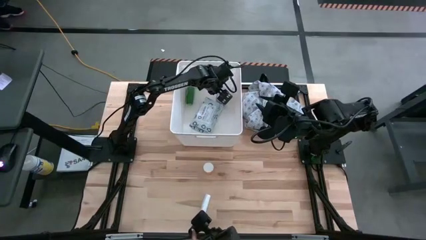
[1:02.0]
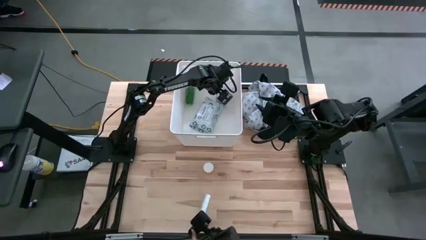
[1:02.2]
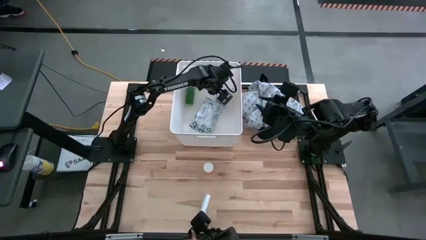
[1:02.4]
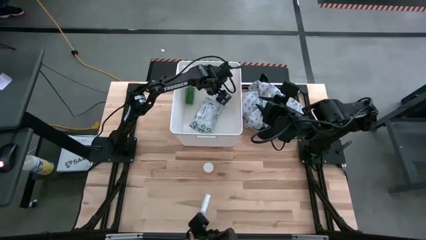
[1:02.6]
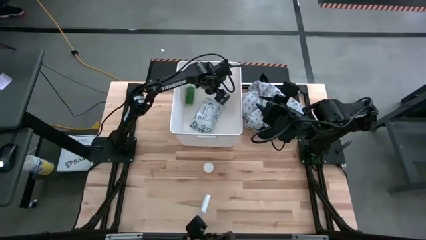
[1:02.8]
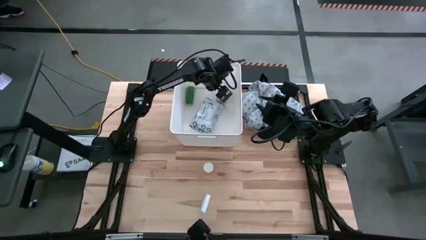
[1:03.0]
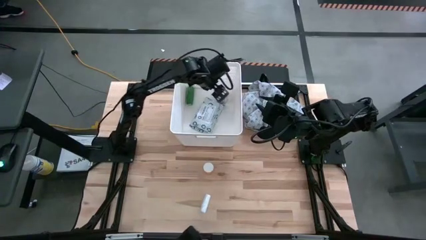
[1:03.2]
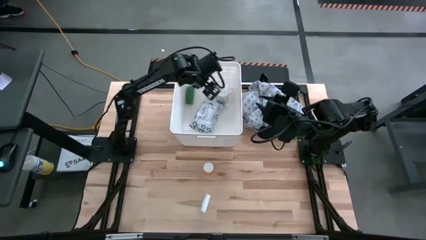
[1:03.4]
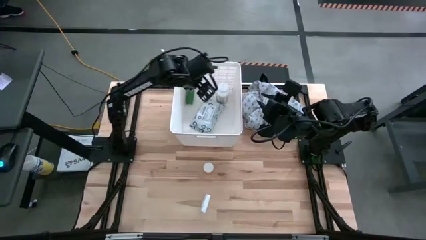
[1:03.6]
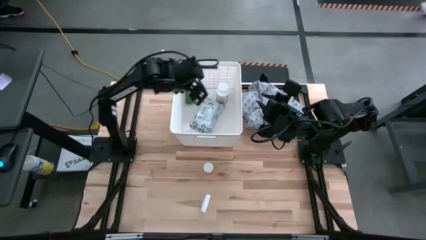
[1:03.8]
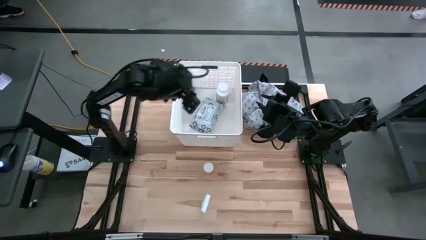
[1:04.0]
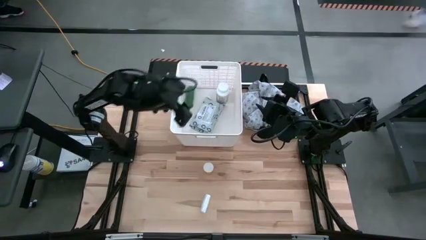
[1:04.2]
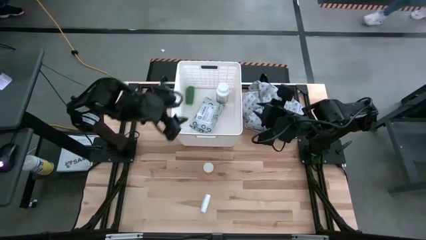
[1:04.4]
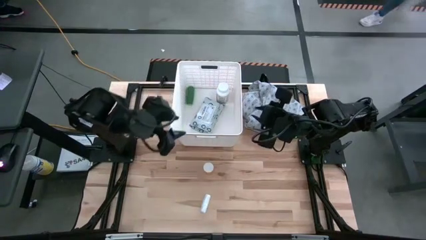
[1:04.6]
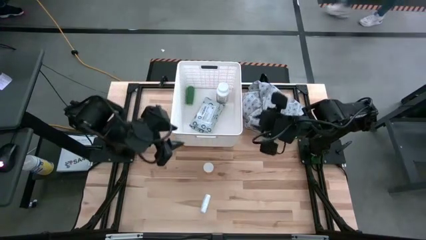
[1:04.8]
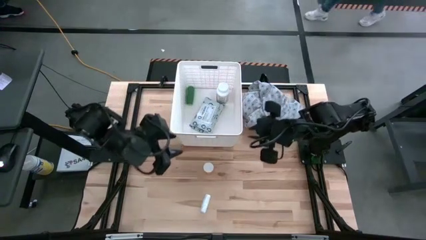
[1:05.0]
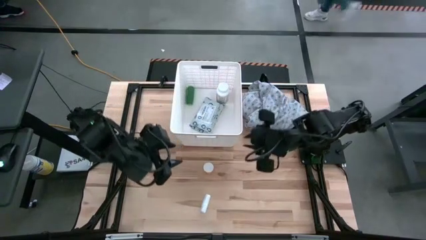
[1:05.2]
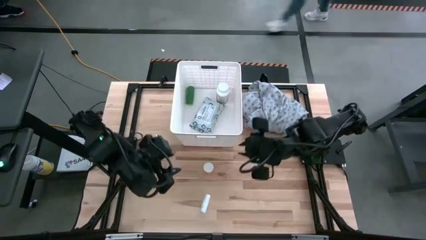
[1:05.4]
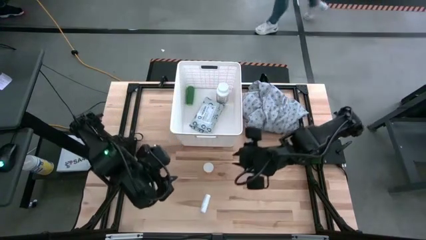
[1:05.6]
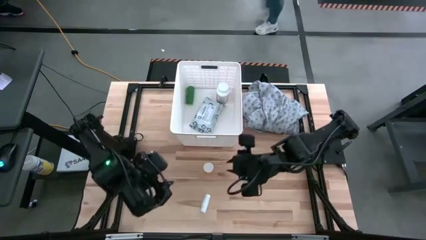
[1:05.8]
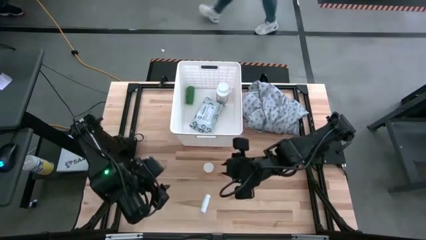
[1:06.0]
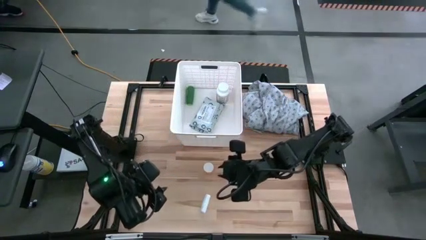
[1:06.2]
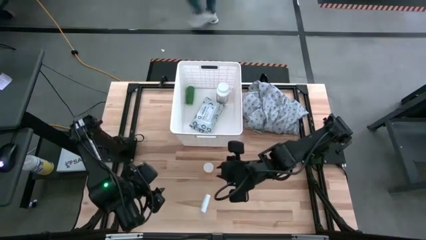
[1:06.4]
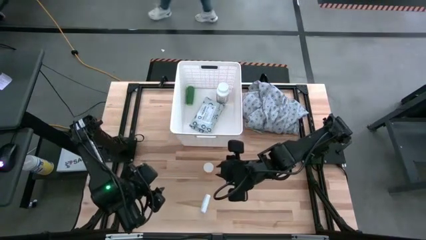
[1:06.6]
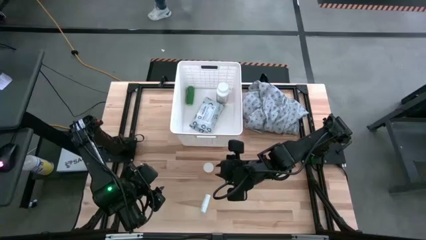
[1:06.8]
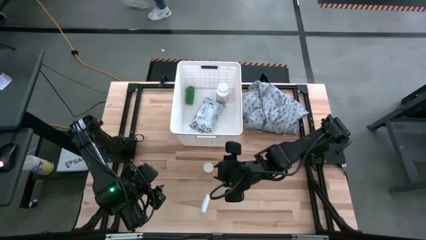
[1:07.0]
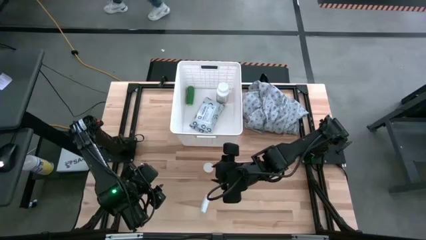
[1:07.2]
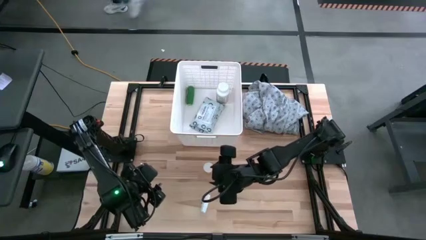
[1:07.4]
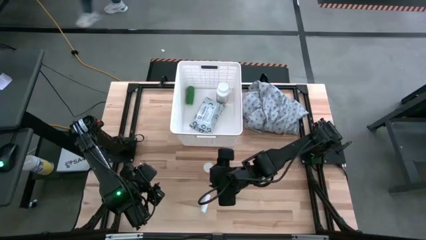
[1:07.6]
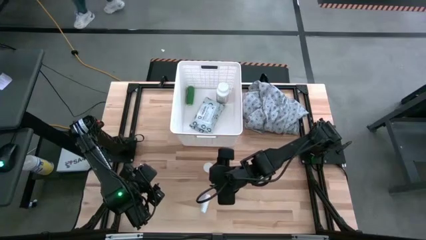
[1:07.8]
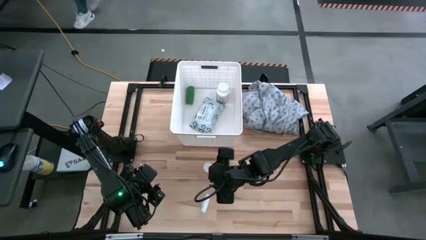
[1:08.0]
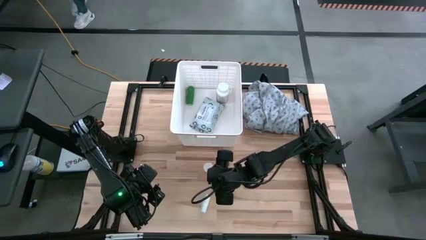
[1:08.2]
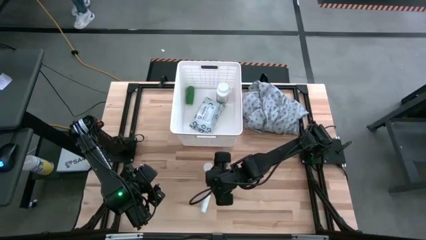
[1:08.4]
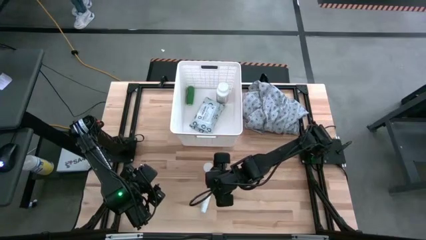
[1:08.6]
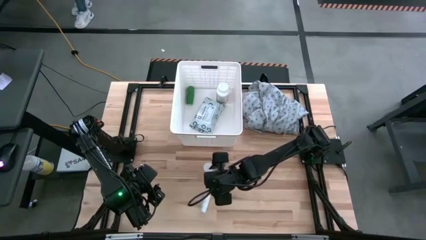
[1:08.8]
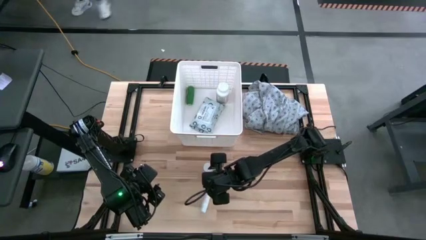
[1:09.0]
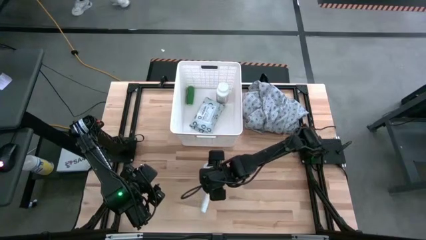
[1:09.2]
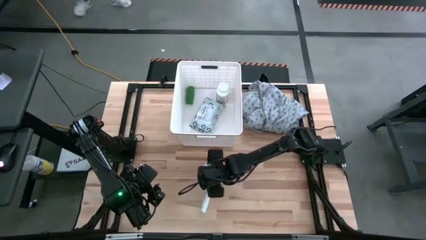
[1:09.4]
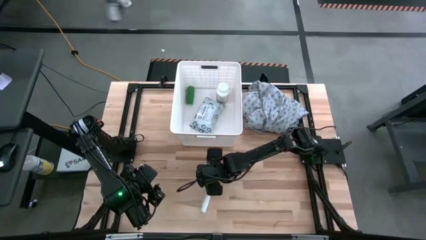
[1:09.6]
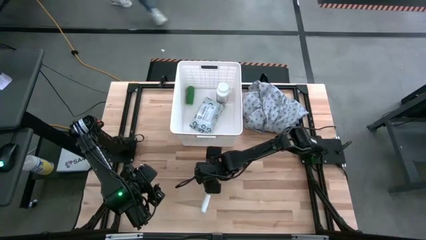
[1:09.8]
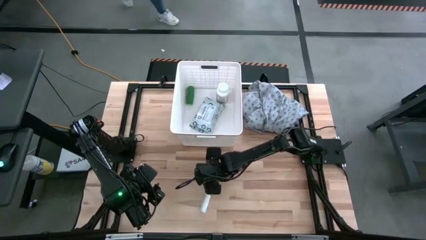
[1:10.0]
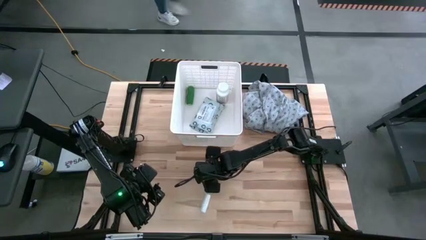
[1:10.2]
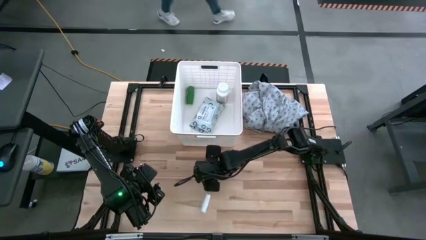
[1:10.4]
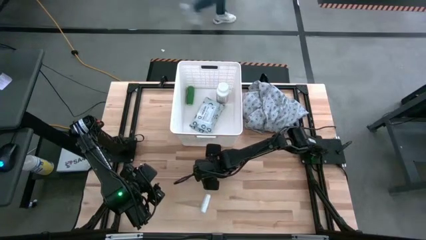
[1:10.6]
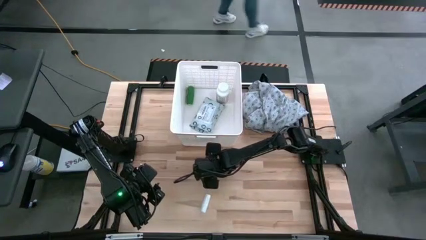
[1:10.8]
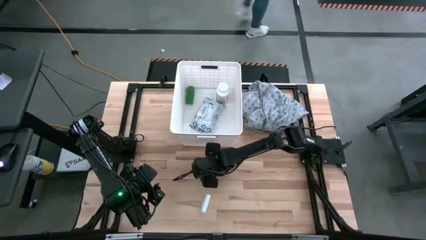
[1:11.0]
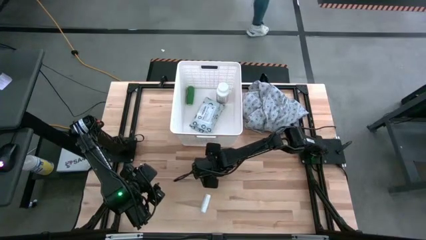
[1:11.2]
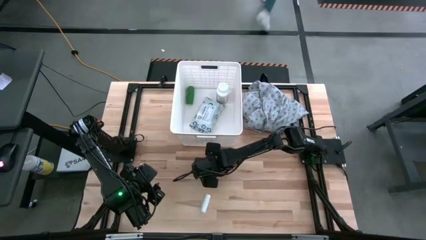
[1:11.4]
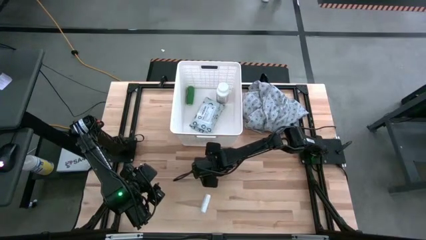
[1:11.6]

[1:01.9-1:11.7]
Task: Pick & place medical supplies in basket/bin
Put the orange pill bottle into the white laundry organizer

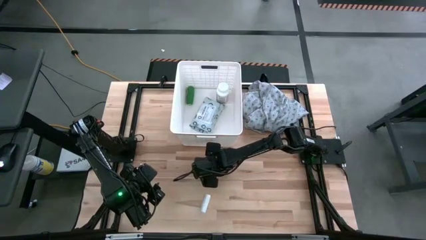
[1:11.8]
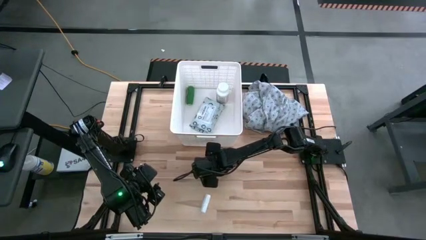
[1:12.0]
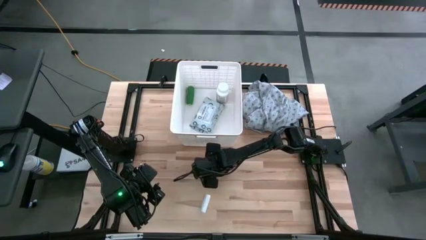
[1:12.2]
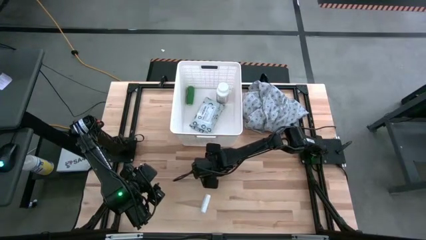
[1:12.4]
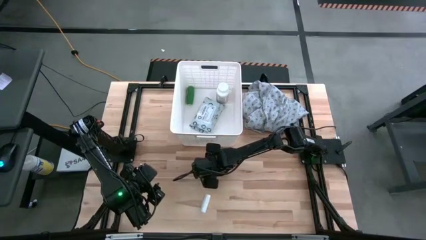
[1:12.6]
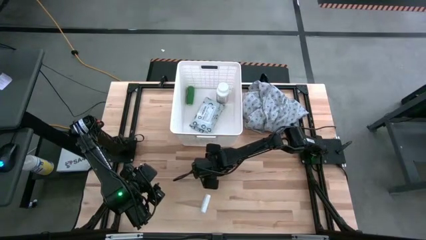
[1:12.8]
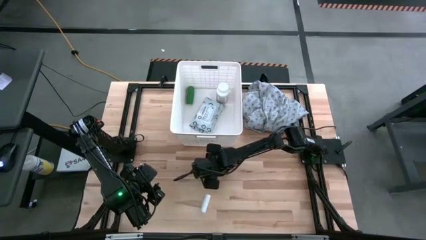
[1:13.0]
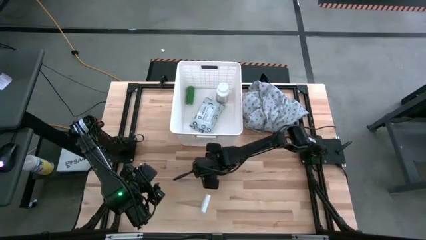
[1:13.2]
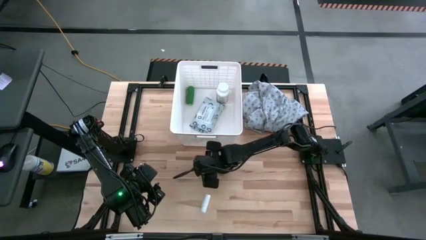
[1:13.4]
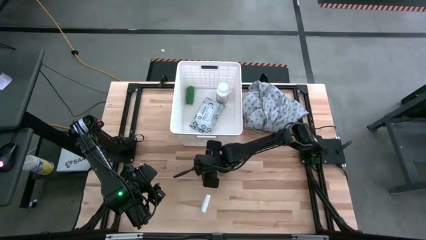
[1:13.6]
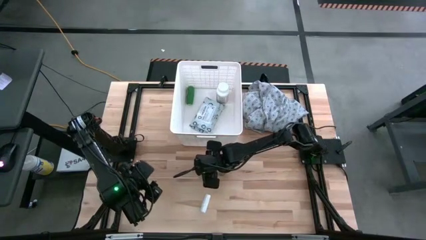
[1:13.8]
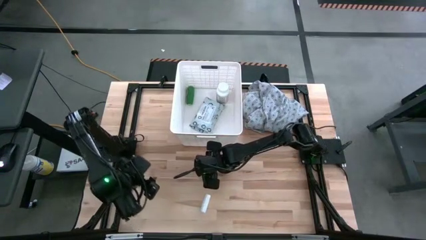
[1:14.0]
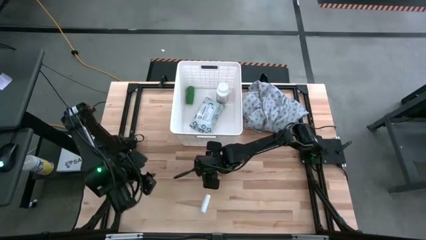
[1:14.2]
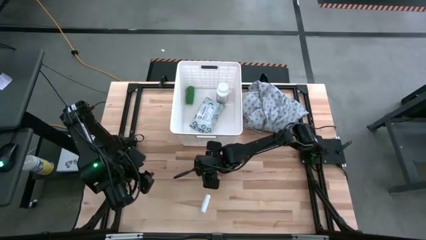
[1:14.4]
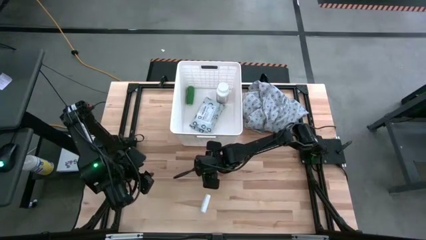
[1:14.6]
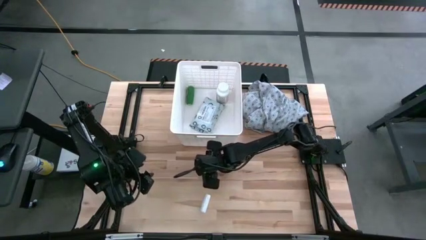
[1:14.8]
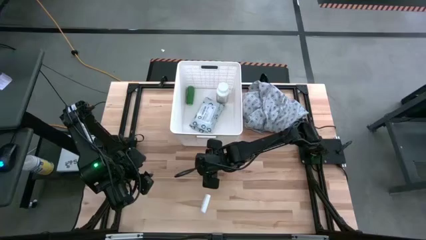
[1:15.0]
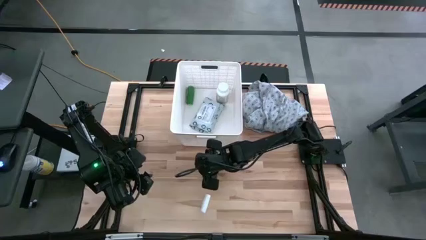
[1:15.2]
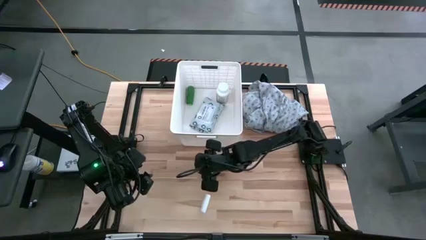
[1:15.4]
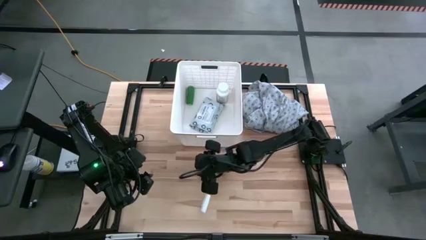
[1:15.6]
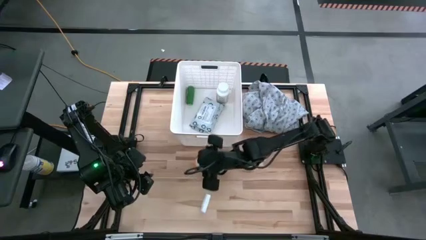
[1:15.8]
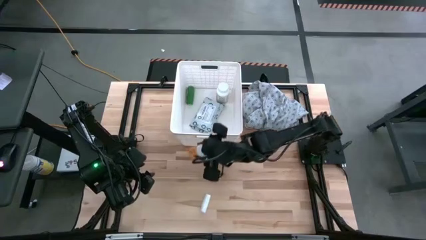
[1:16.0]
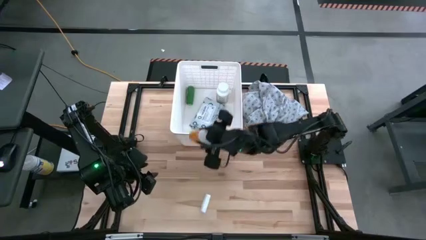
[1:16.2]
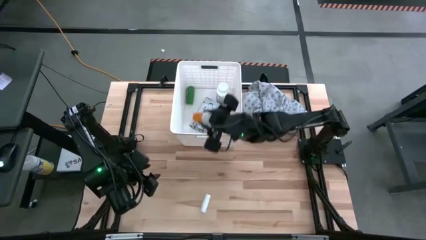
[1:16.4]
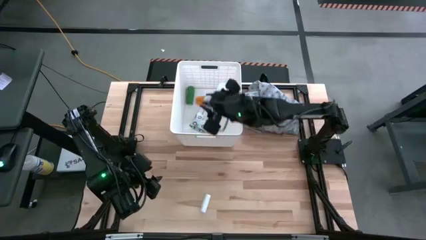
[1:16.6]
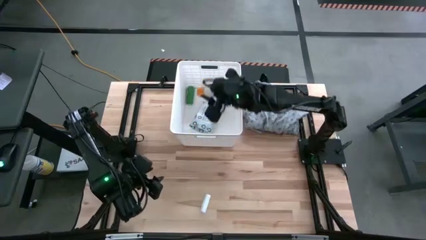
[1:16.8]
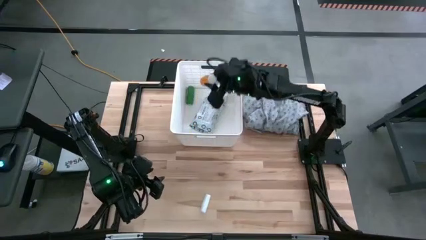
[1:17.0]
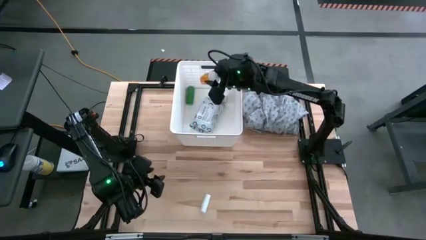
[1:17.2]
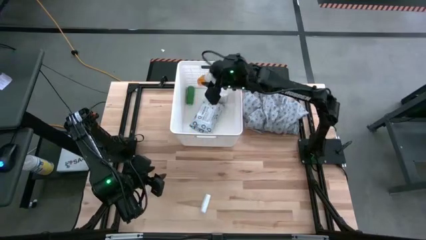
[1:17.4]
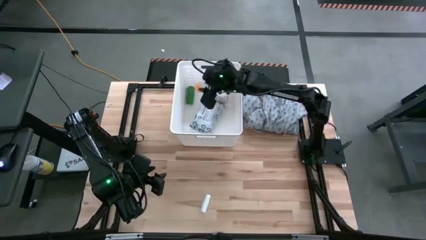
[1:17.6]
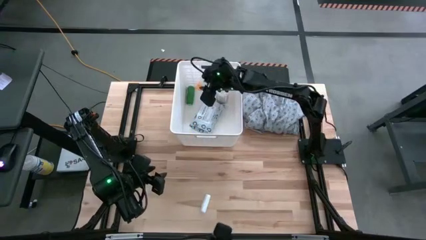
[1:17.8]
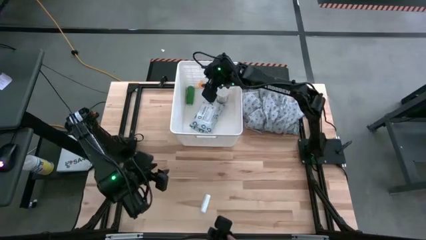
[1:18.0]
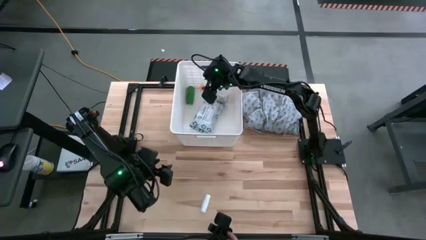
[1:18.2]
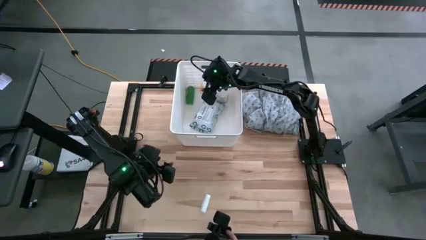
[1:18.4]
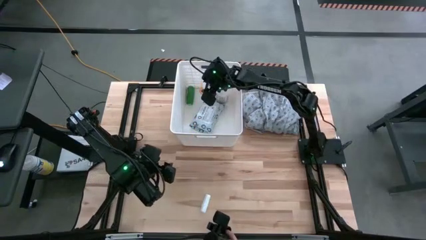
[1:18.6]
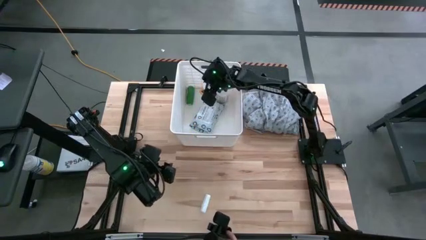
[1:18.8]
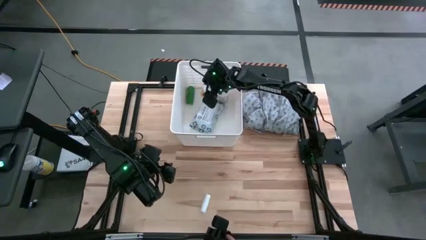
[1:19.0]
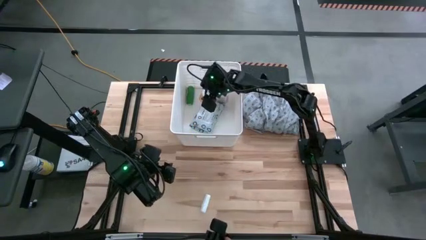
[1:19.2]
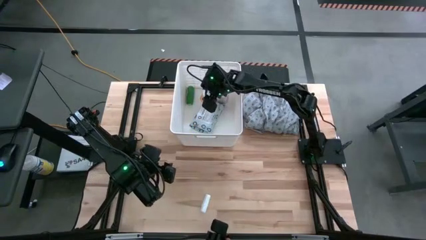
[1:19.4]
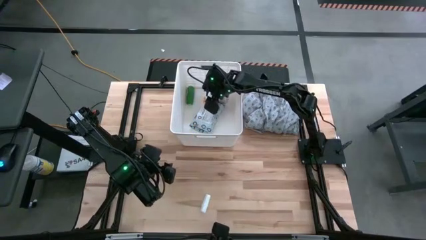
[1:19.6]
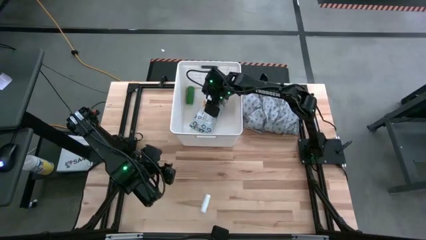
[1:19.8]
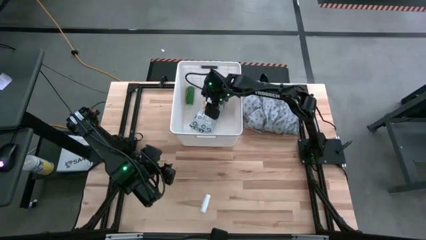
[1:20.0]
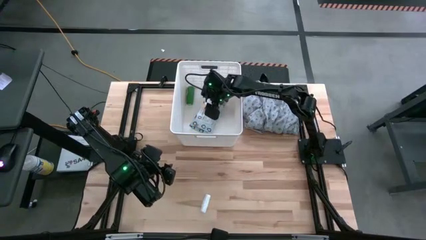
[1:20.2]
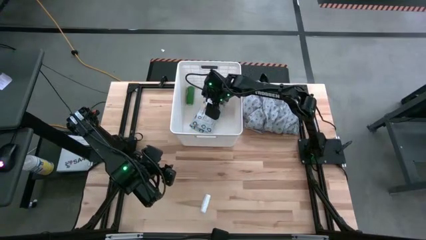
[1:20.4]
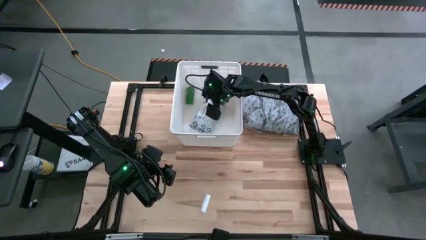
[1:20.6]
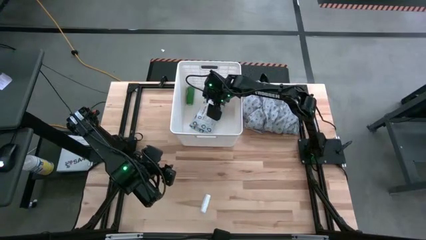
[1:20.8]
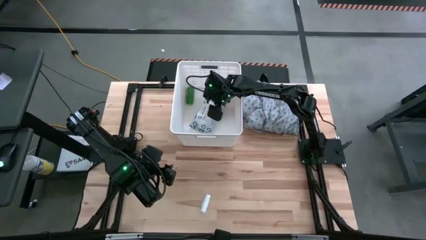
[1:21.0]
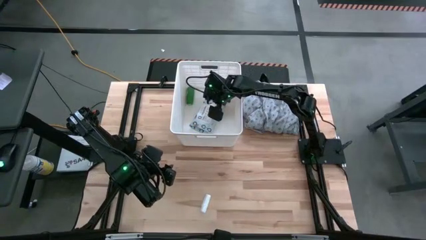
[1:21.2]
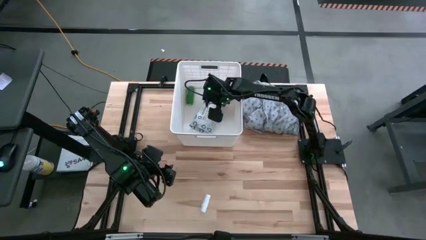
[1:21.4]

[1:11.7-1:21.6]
Put the orange pill bottle into the white laundry organizer
